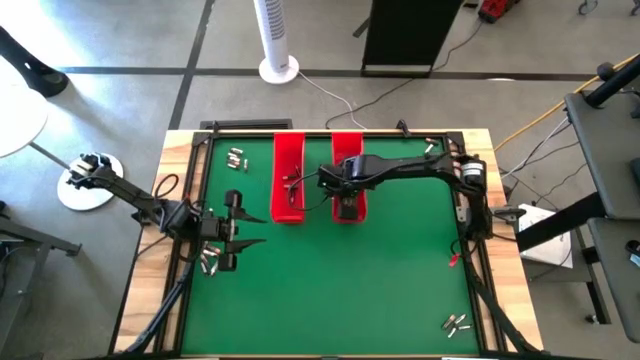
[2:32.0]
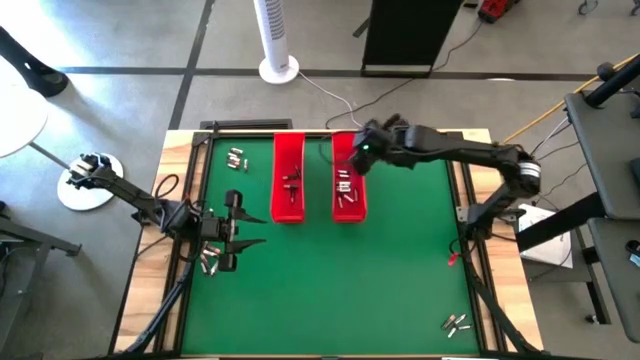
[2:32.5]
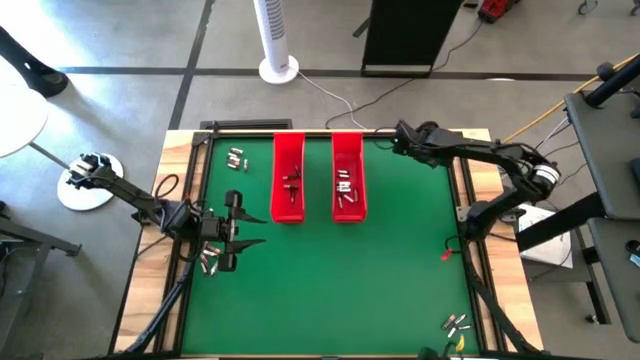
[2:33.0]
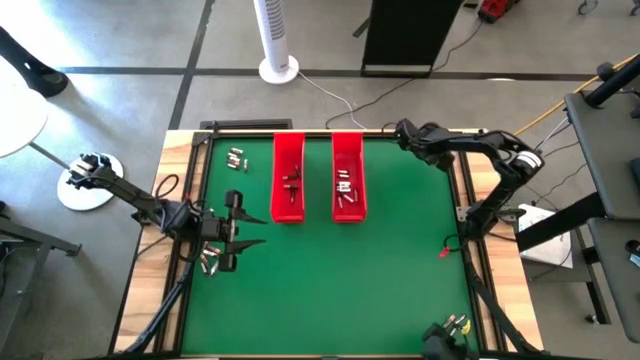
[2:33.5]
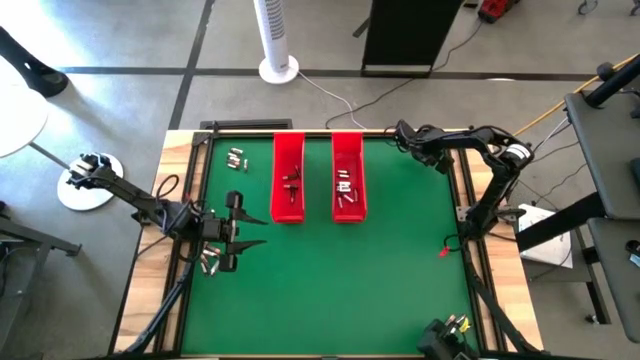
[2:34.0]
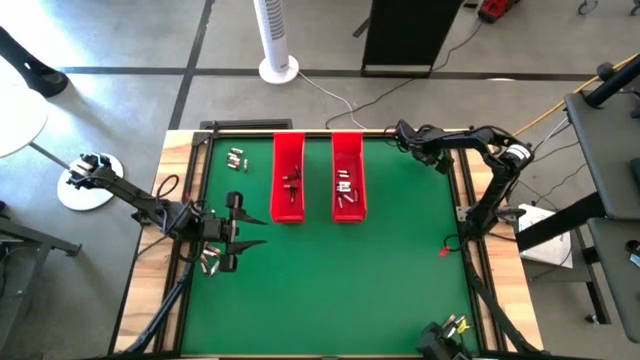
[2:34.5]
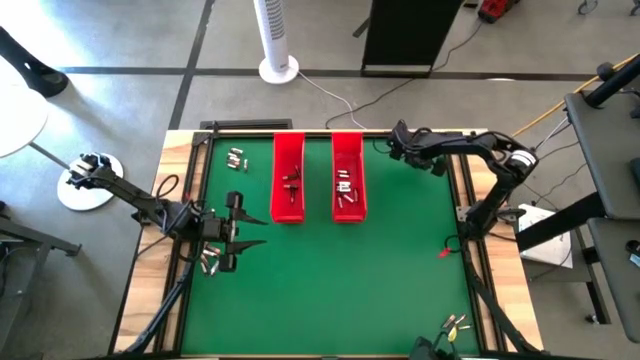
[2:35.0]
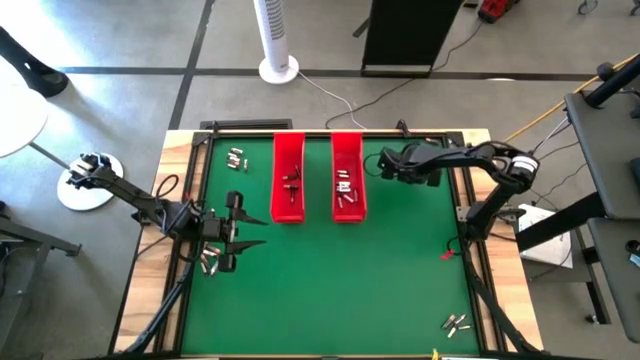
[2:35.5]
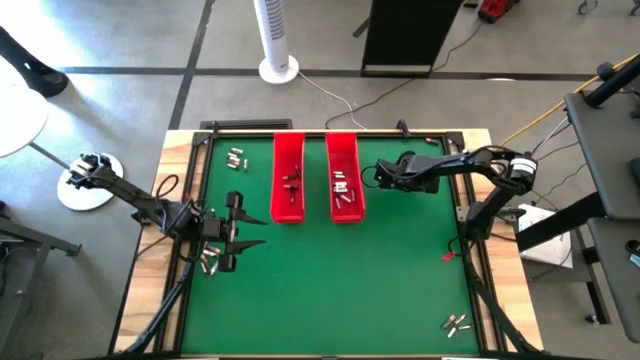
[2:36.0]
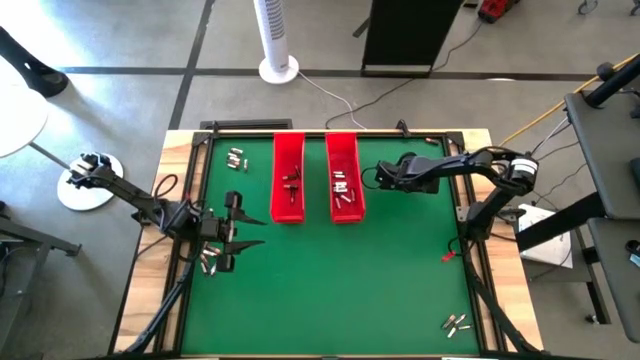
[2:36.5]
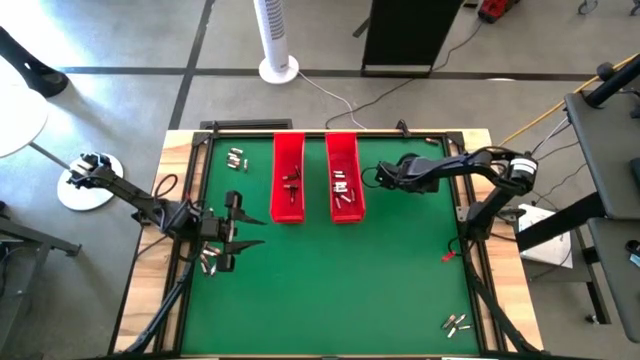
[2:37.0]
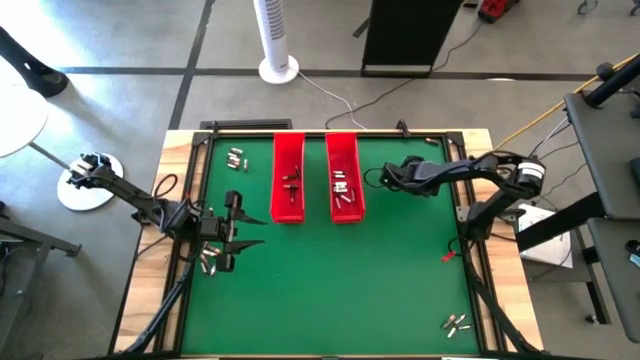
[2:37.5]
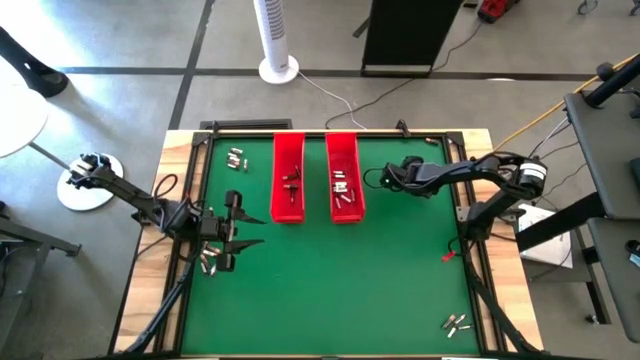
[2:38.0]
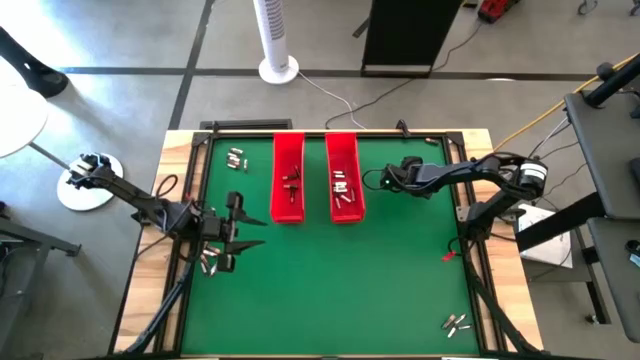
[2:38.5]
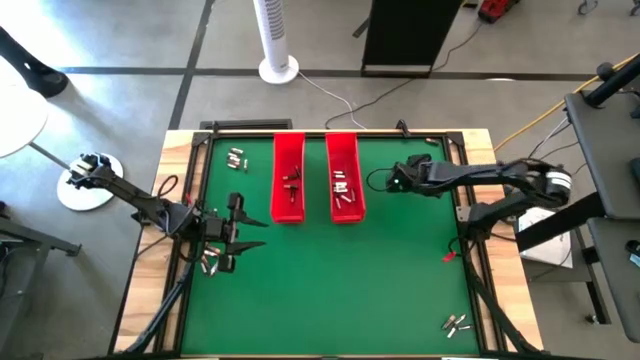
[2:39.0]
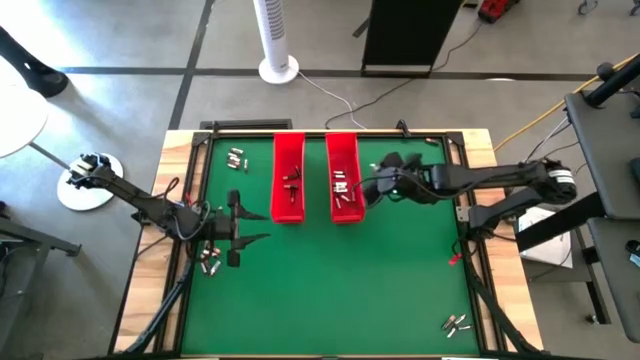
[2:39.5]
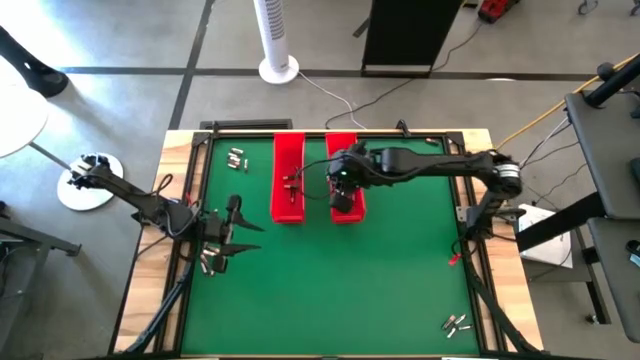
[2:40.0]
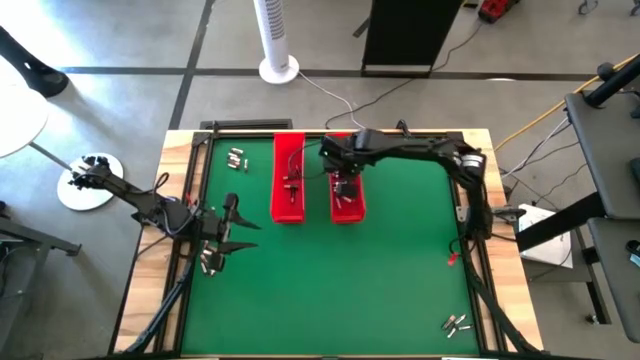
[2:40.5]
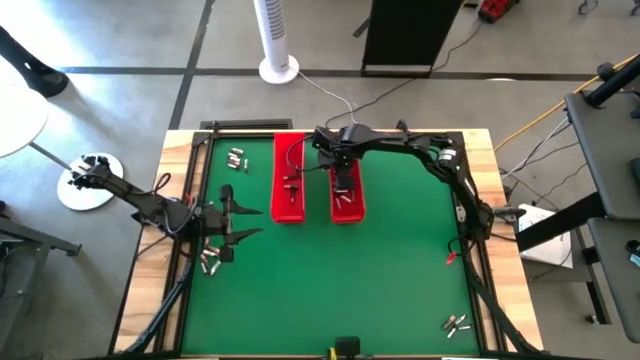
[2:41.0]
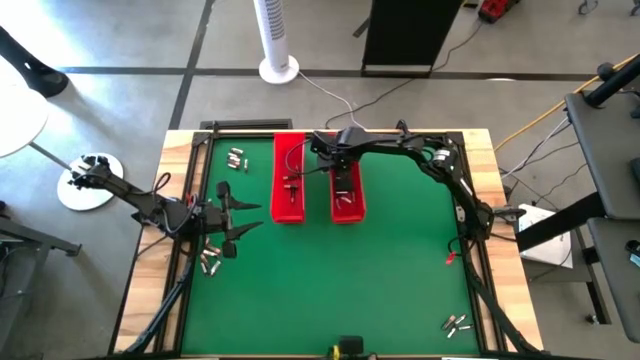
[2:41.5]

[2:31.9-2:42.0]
Task: Sort batteries
Put the silver battery into the right red bin

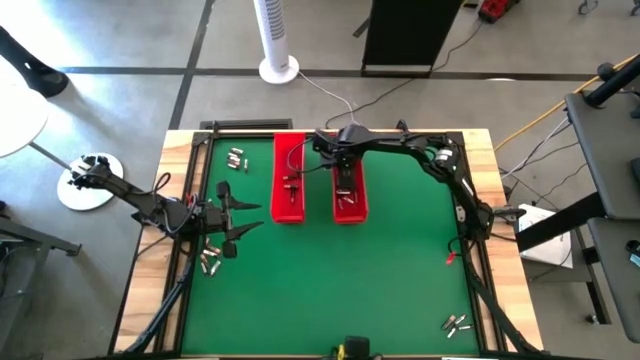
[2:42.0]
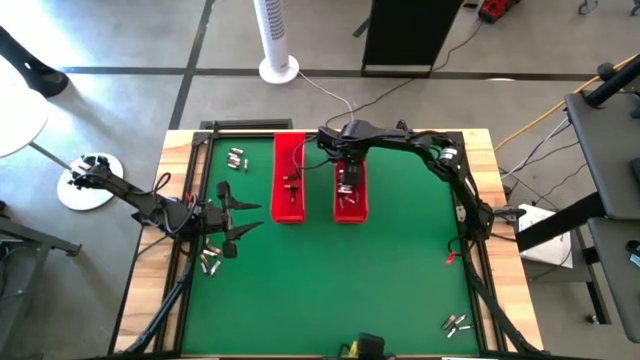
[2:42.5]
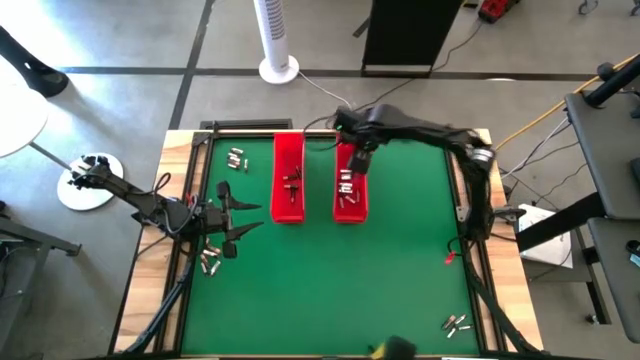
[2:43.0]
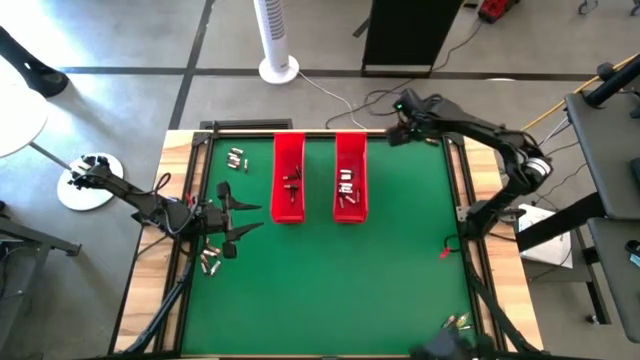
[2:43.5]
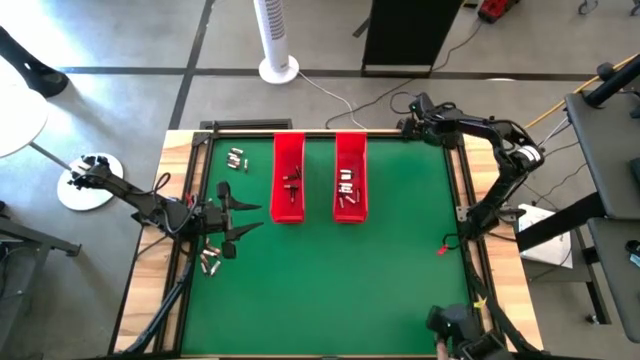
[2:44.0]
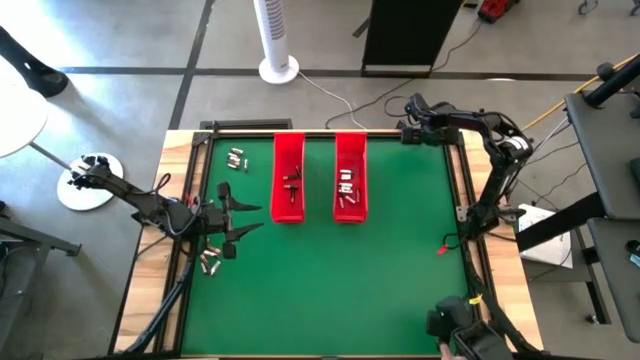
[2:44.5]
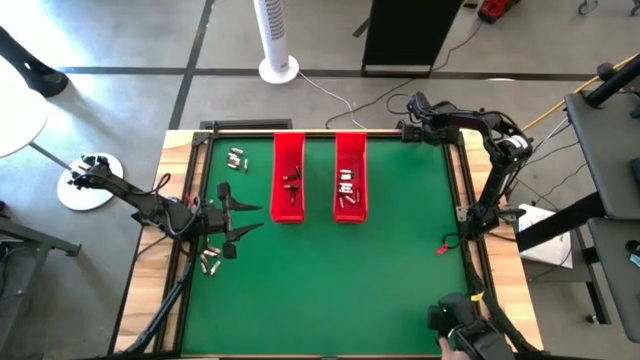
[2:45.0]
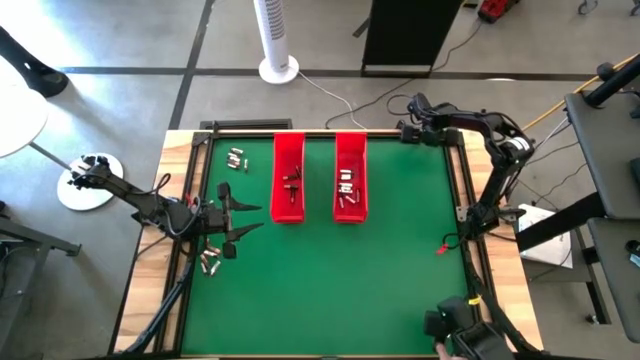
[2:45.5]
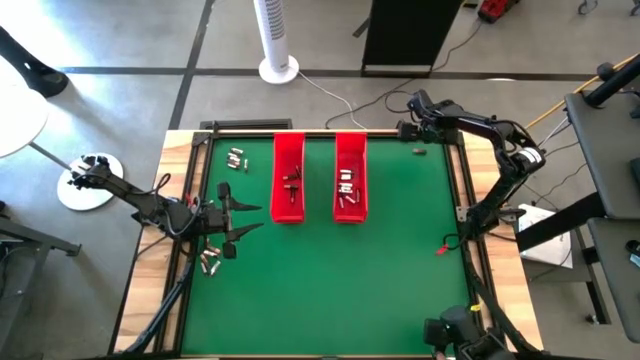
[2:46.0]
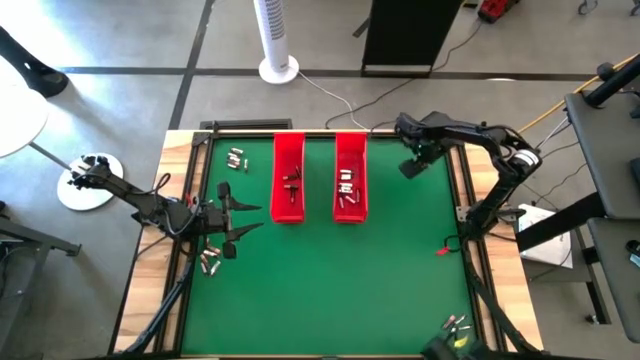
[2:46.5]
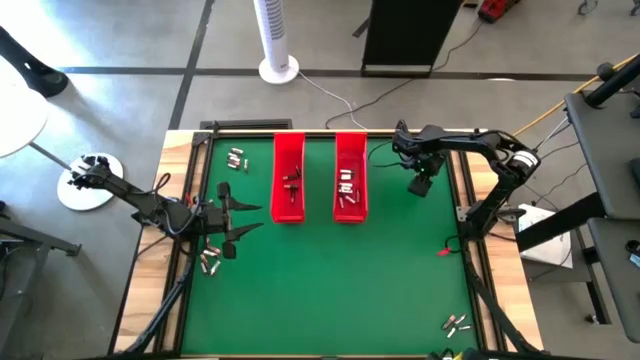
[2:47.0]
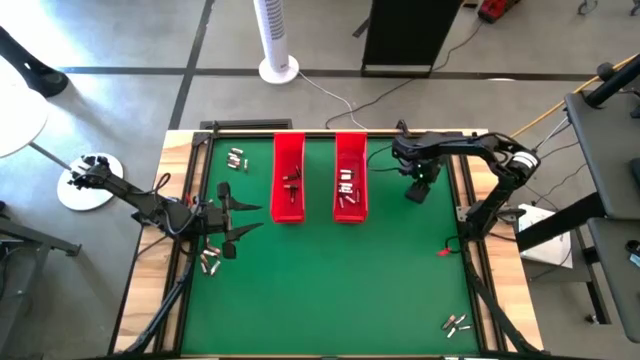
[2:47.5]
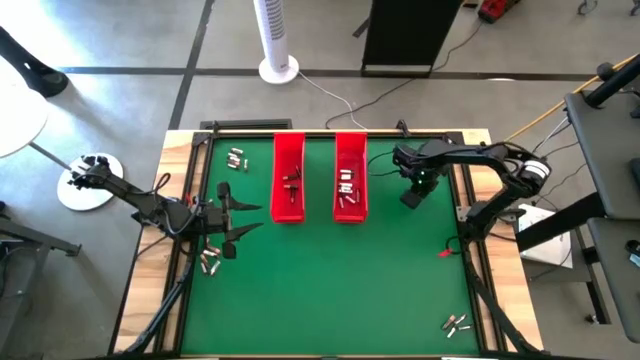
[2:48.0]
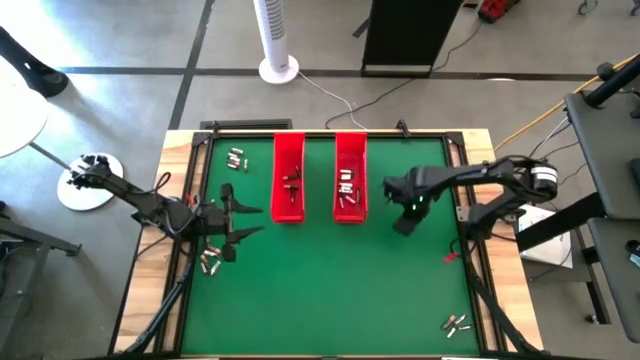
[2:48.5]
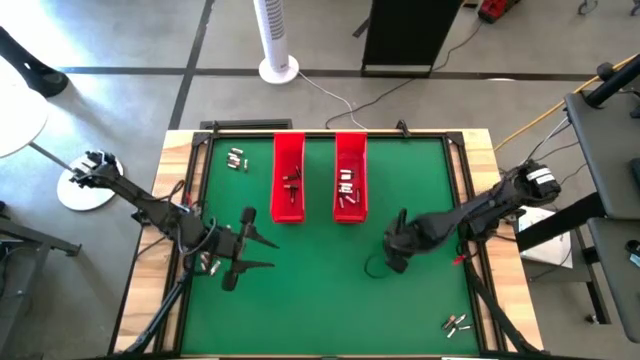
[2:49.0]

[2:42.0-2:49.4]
Put the black battery into the left red bin

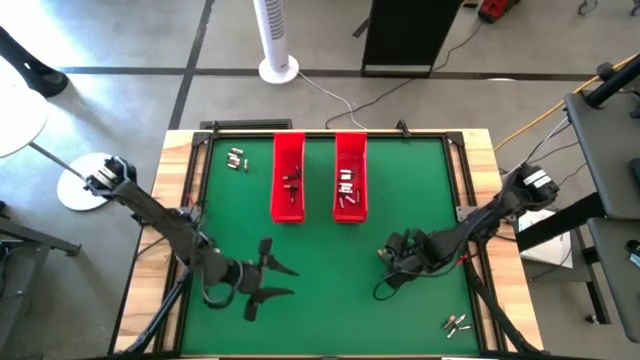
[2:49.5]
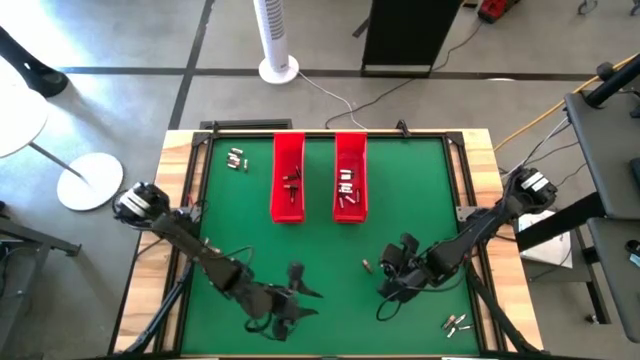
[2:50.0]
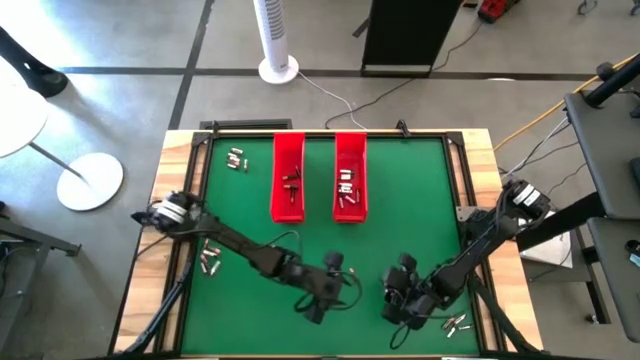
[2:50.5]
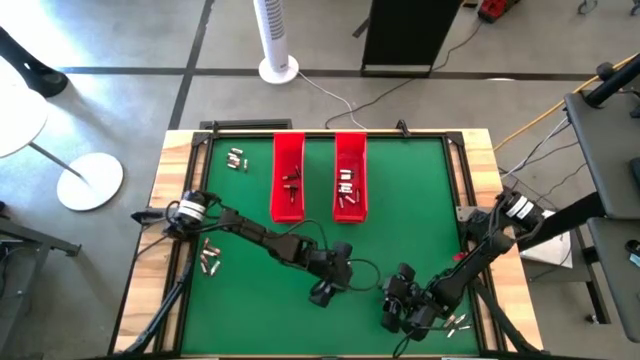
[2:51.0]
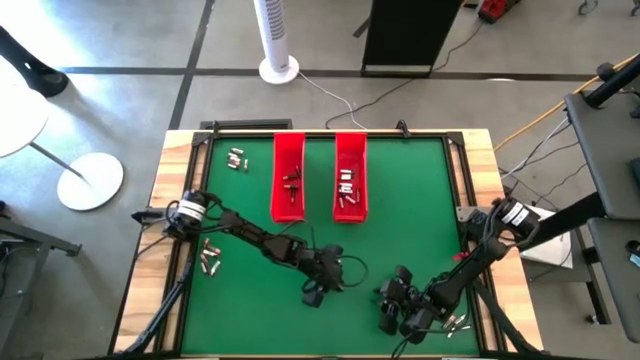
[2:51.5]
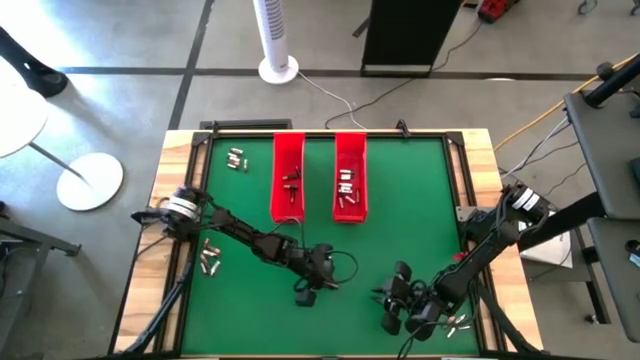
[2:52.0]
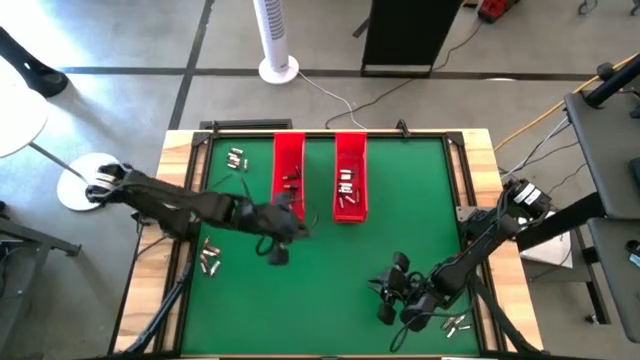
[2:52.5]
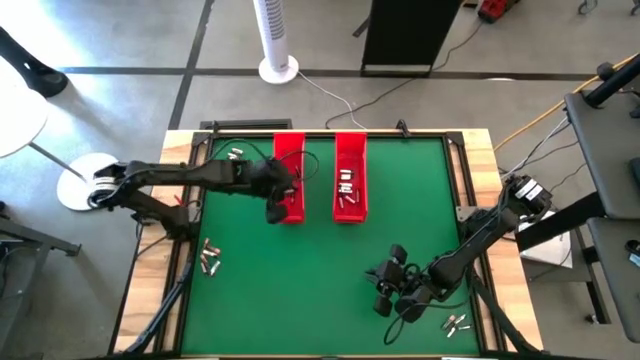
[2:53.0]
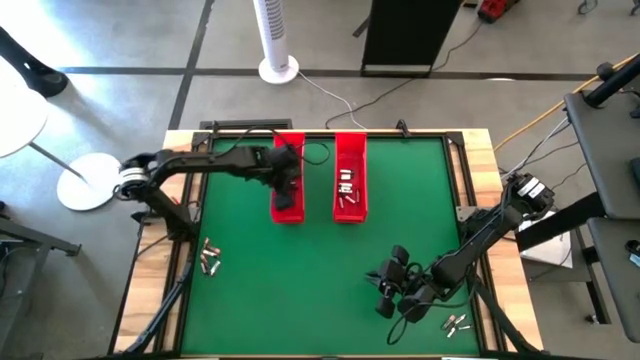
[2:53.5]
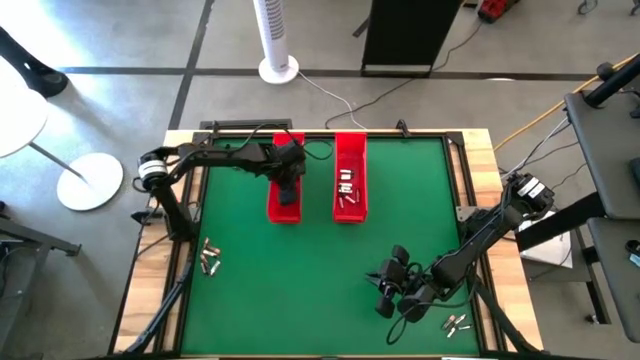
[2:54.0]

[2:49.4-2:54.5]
Put the black battery into the left red bin
